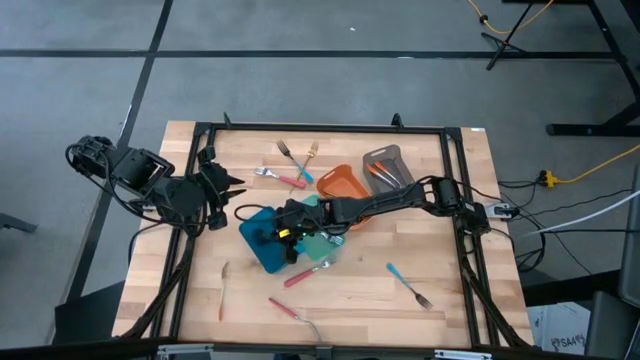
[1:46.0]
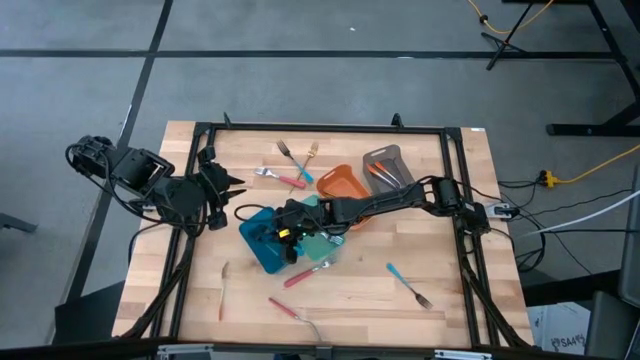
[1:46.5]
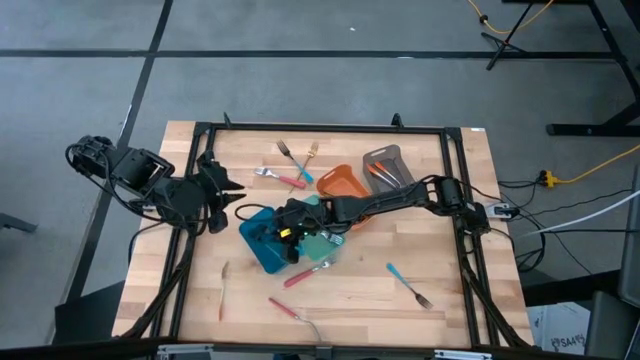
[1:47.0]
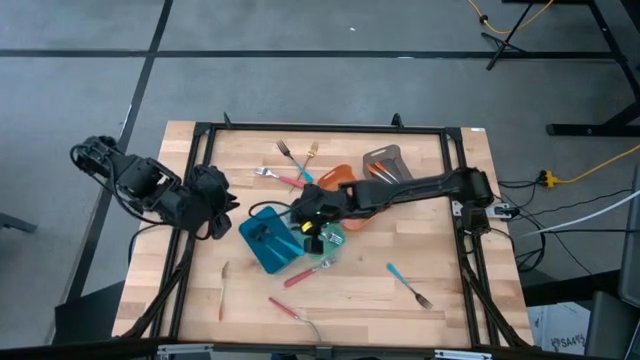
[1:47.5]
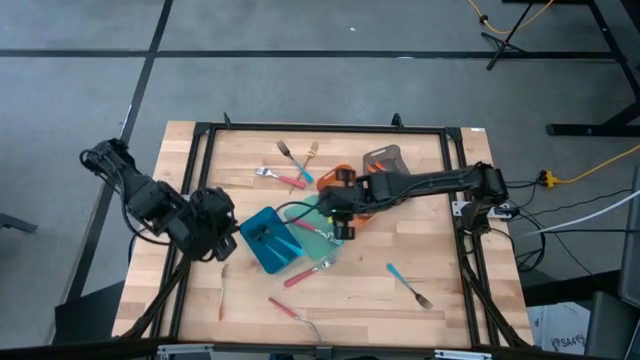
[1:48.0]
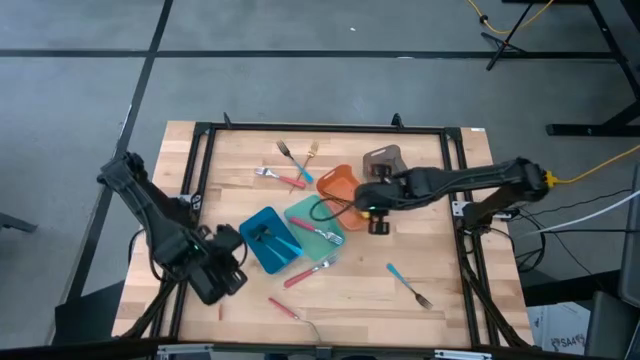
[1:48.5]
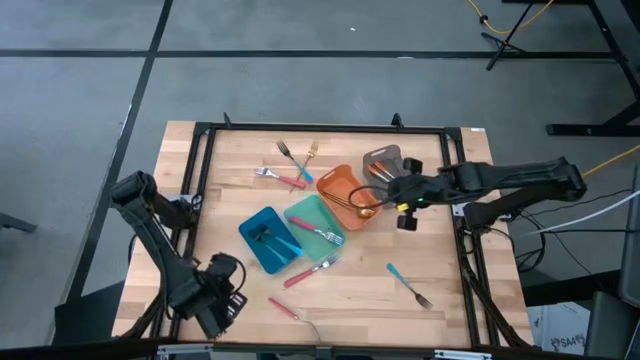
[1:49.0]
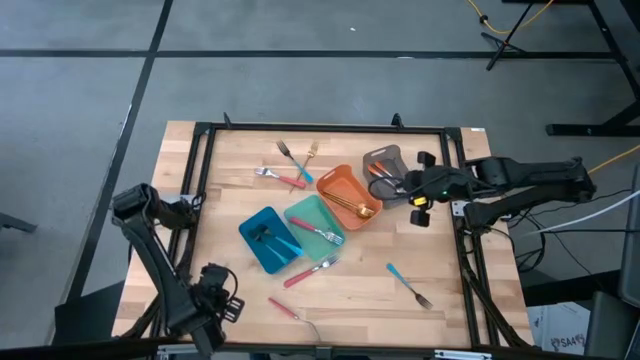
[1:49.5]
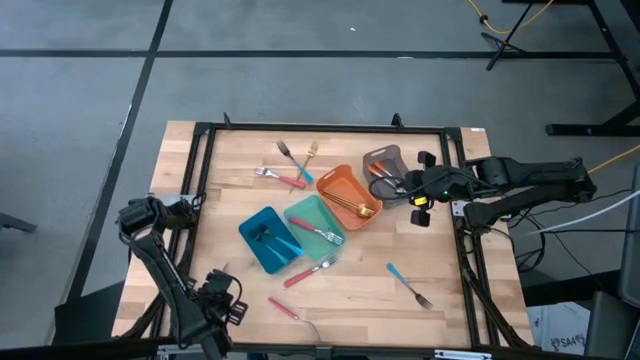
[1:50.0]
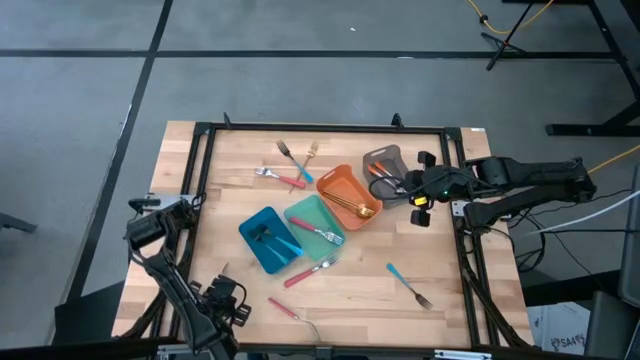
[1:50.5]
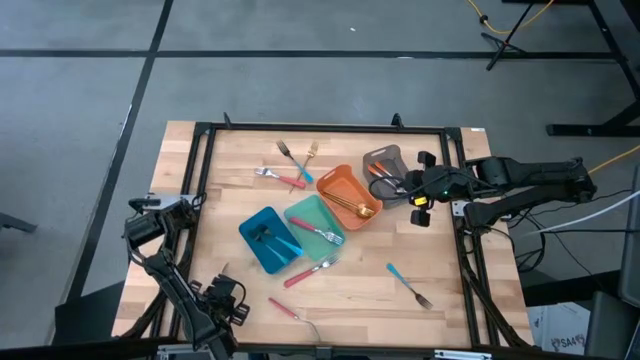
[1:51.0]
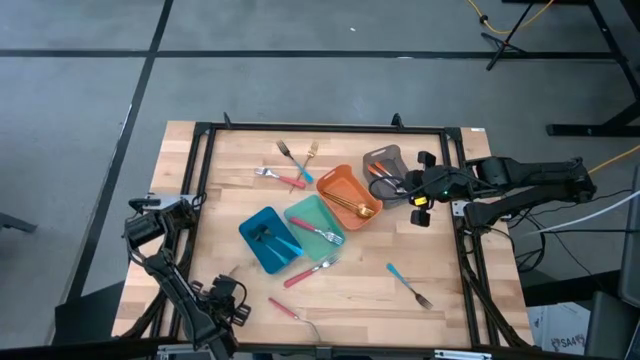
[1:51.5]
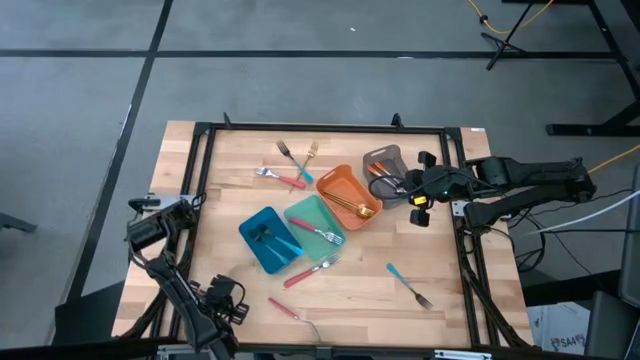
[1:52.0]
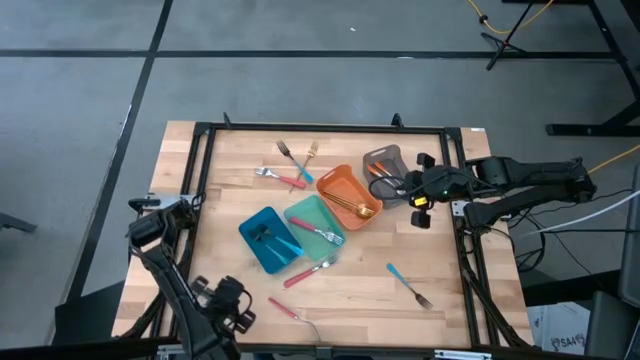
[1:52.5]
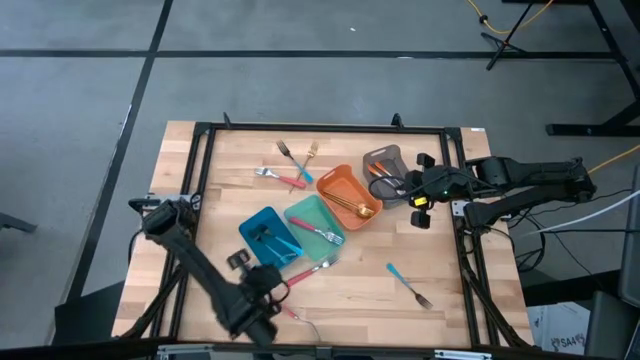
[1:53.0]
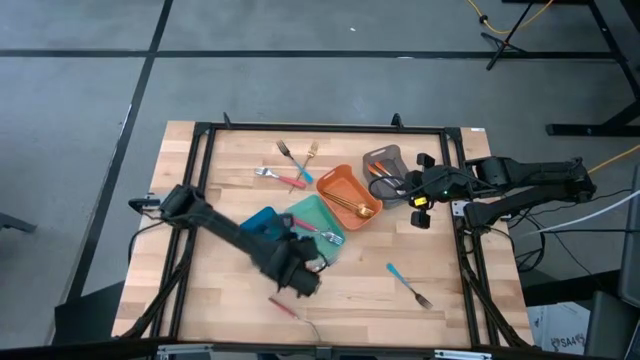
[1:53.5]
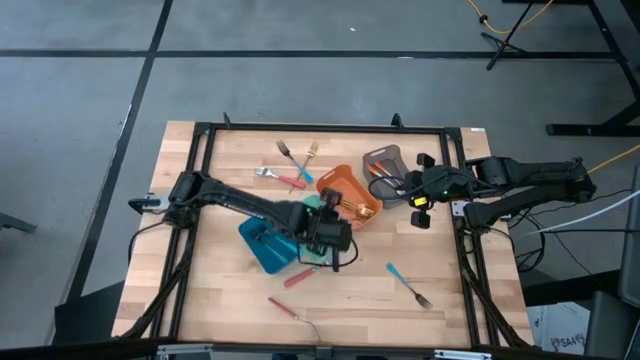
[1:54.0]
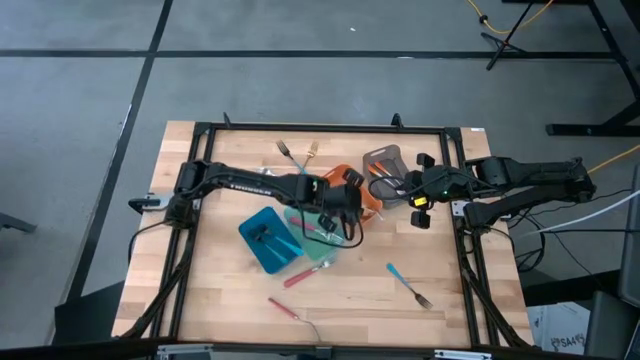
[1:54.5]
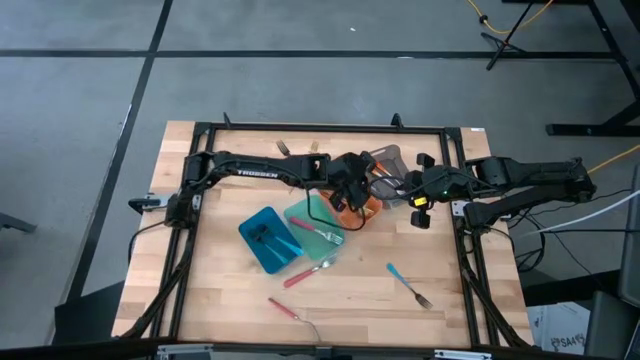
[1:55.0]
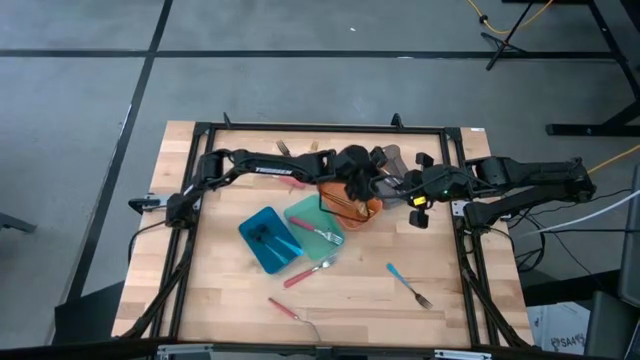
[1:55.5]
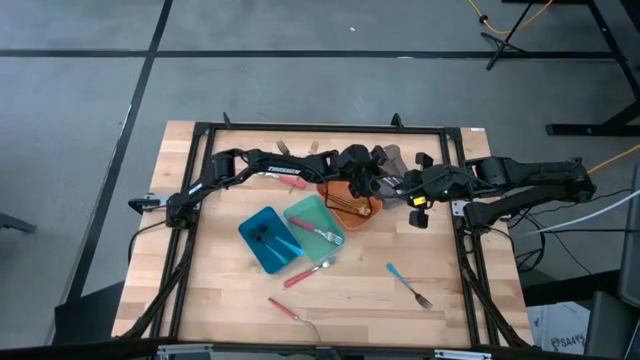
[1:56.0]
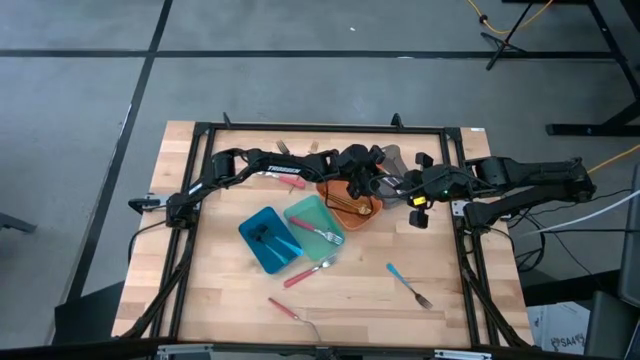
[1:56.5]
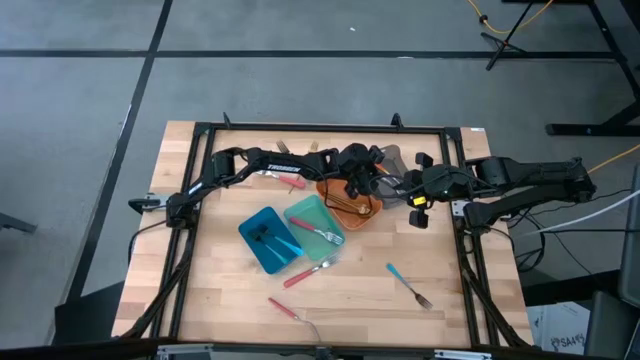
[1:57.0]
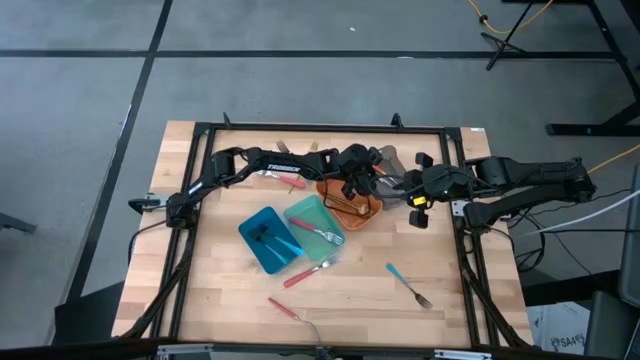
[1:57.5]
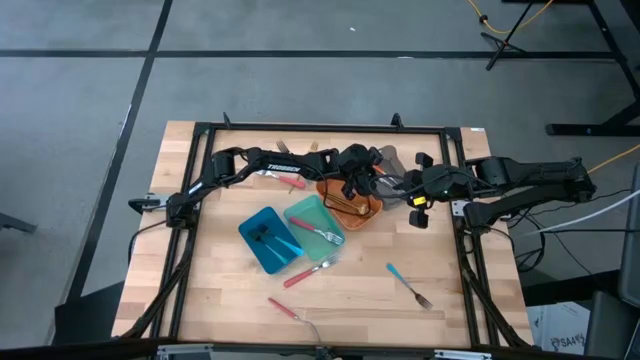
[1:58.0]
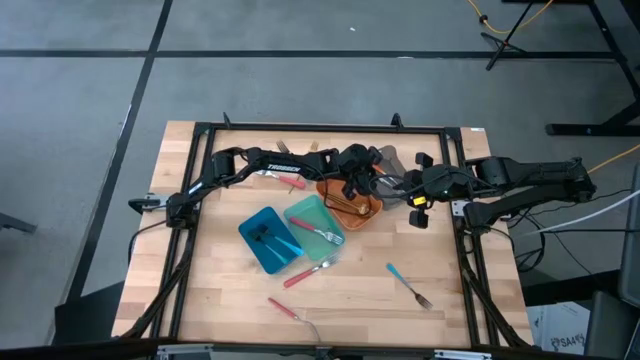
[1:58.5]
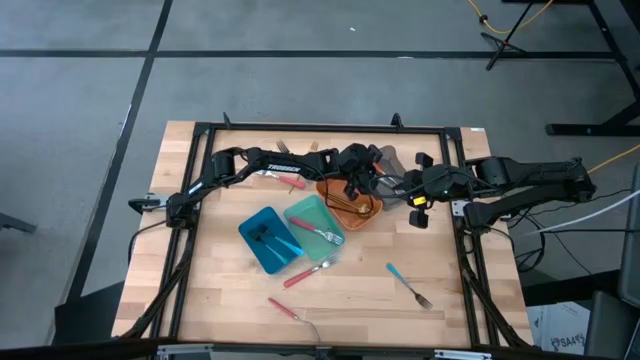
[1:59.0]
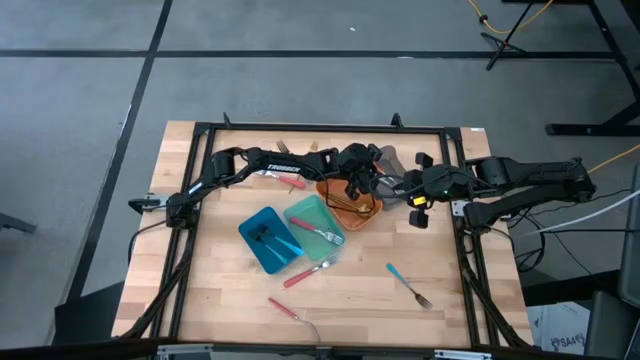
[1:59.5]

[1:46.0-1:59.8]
Task: Sort silverware by color (type)
Put the orange fork into the black bin

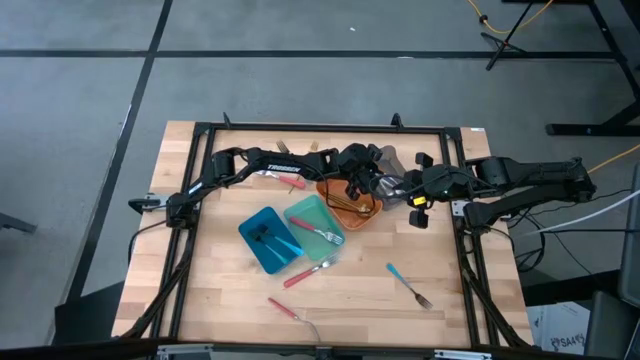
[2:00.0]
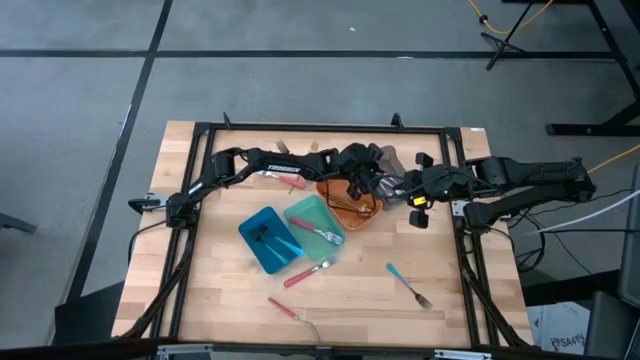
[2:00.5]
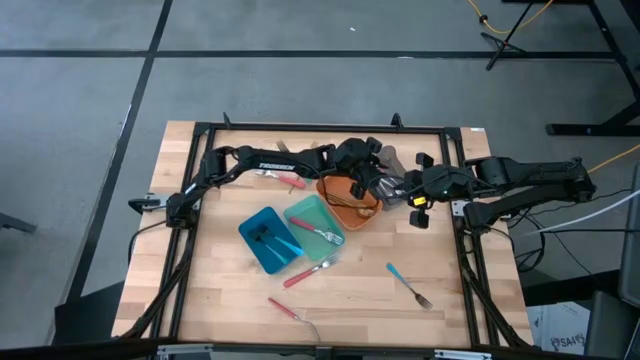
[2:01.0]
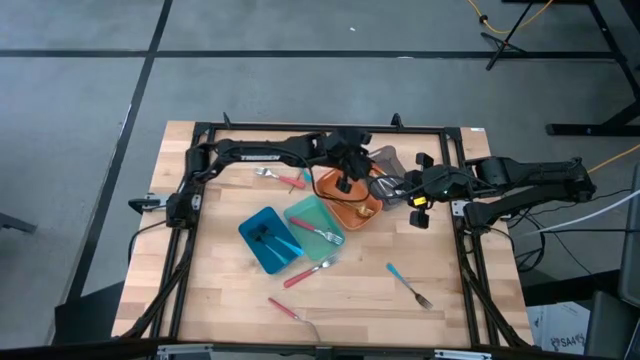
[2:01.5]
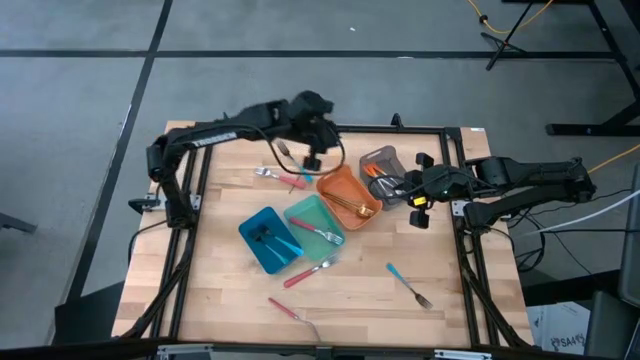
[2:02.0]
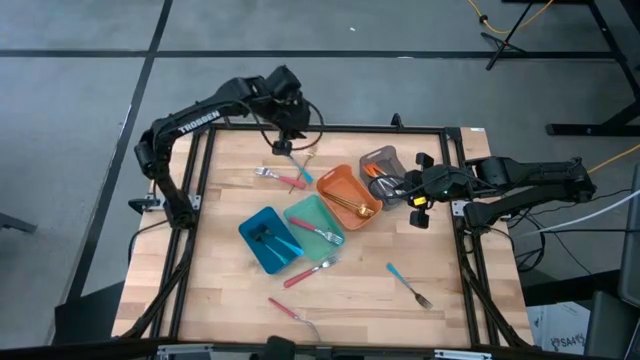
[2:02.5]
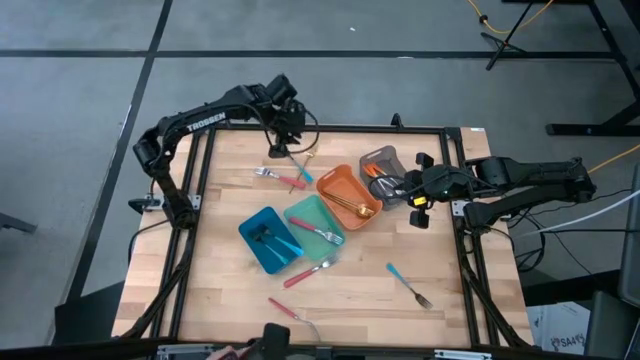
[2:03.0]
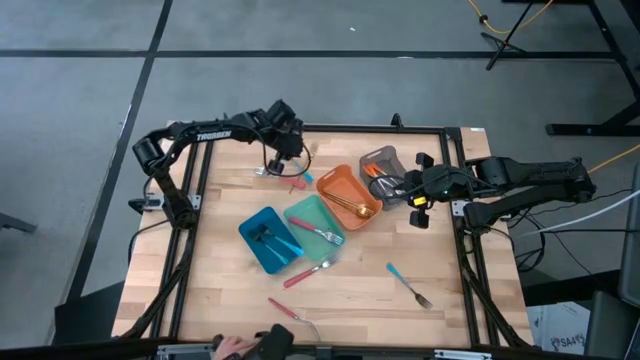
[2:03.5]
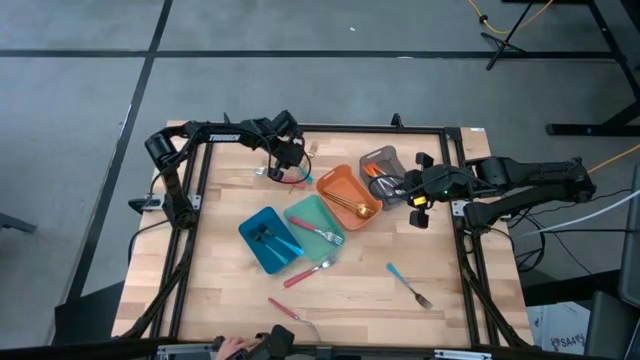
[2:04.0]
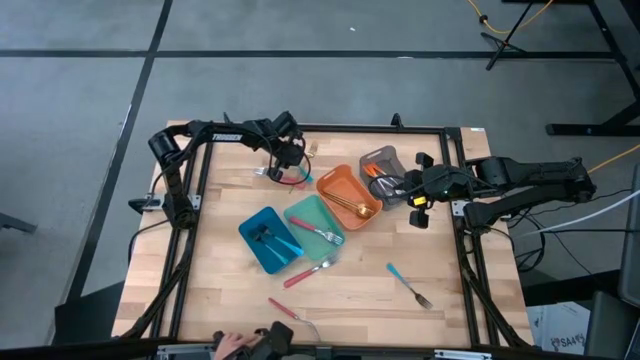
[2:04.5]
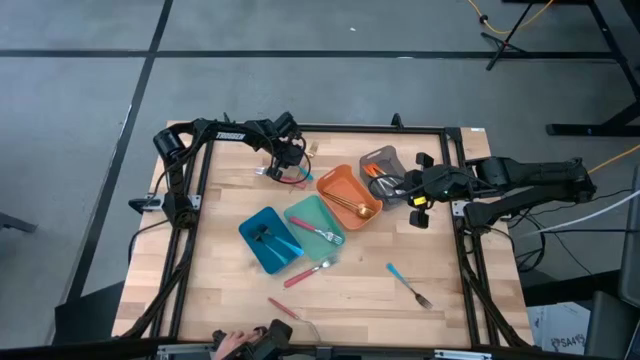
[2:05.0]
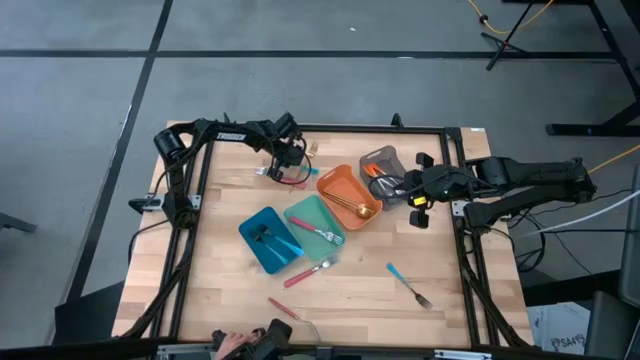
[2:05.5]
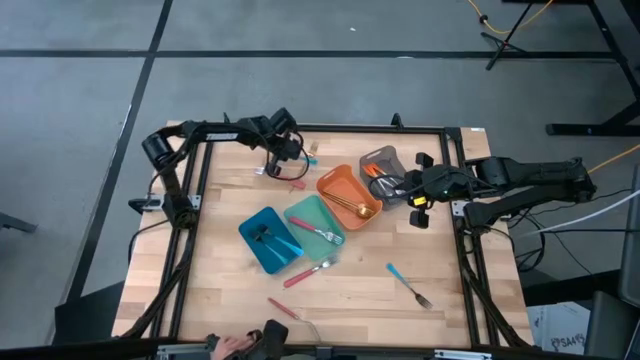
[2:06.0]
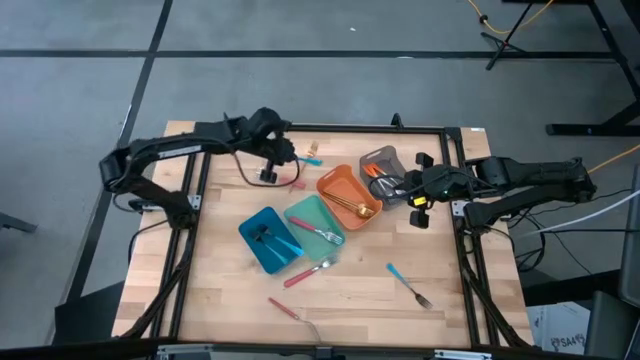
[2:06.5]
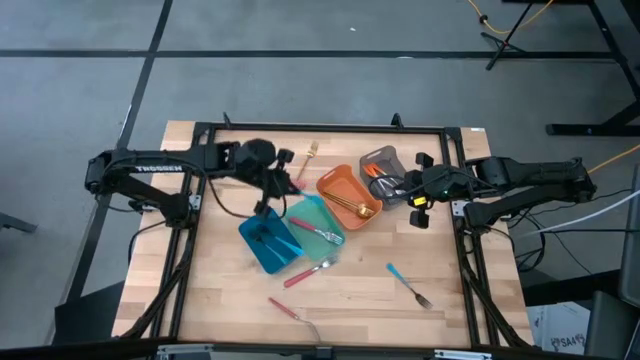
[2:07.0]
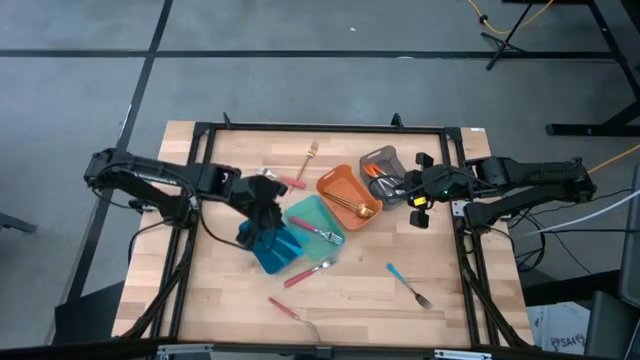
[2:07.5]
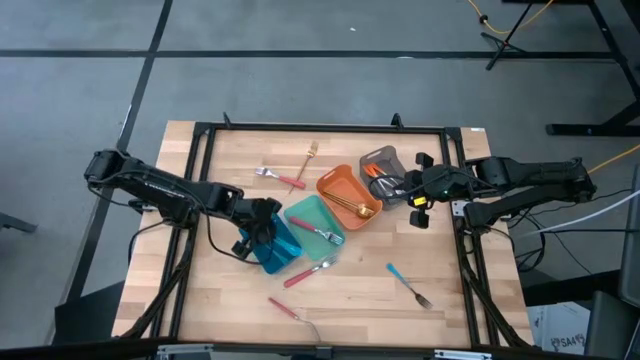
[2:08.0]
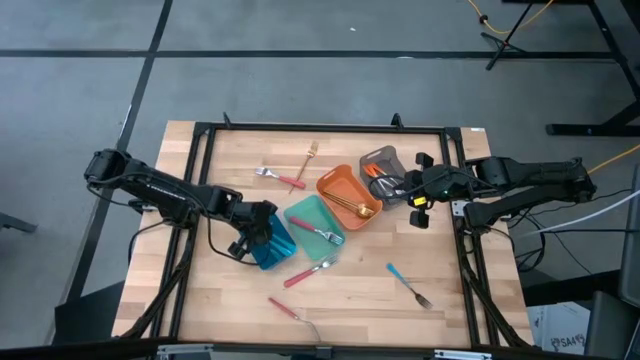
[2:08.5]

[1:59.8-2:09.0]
Put the blue fork into the blue bin
